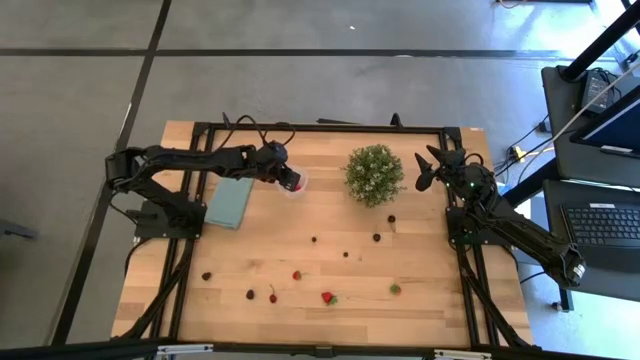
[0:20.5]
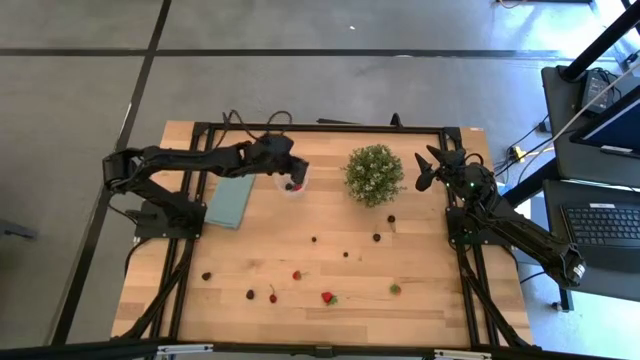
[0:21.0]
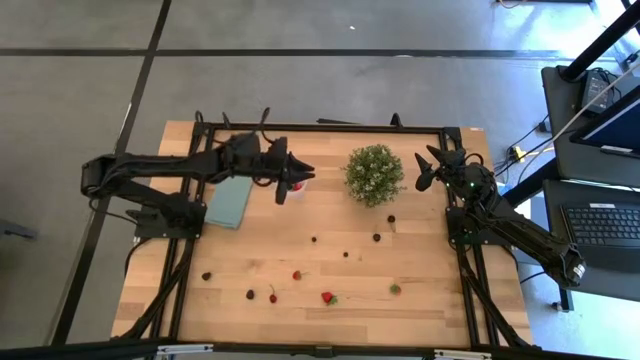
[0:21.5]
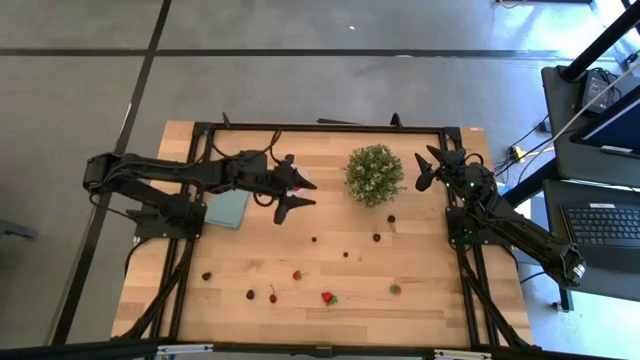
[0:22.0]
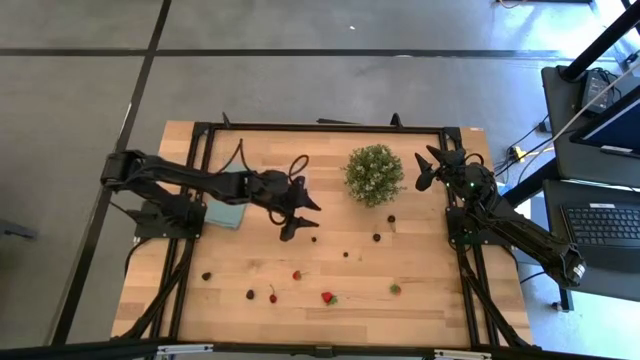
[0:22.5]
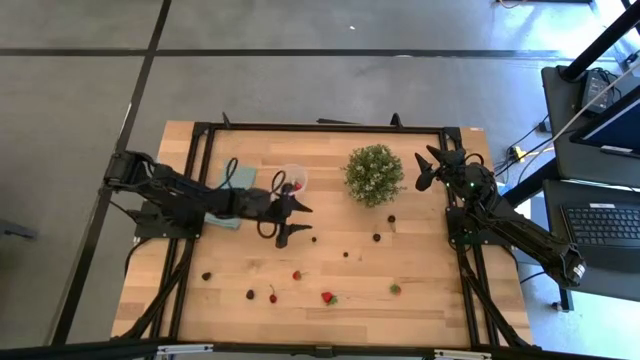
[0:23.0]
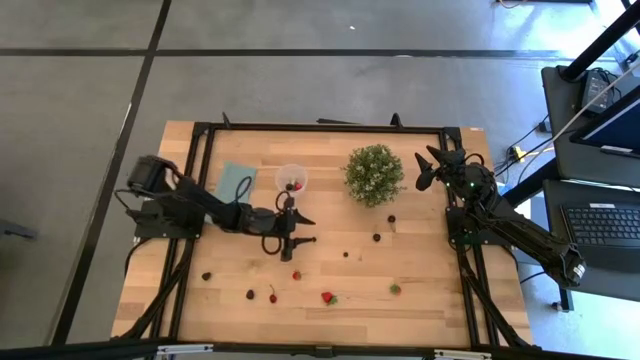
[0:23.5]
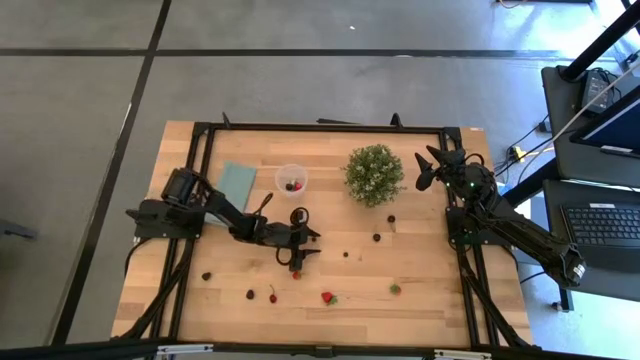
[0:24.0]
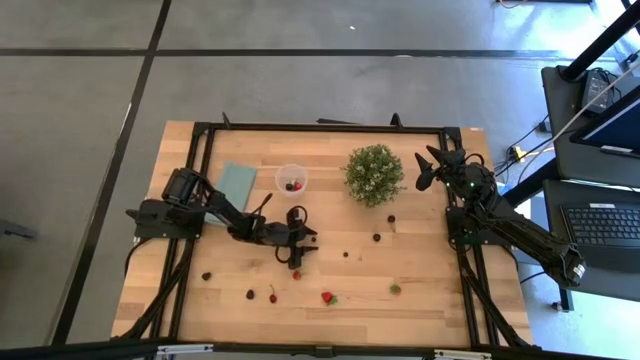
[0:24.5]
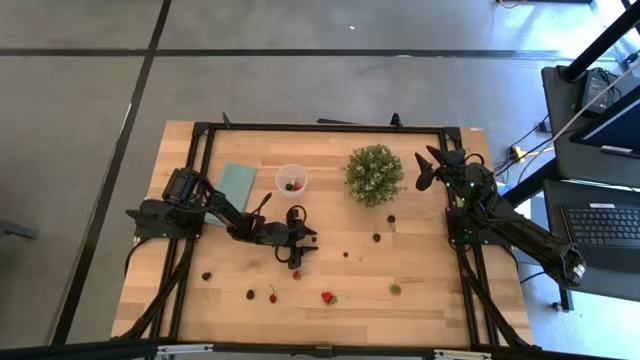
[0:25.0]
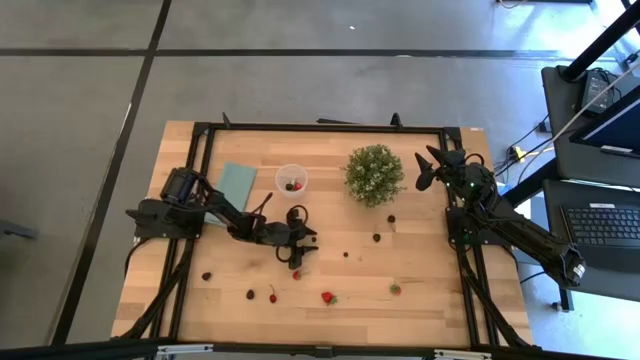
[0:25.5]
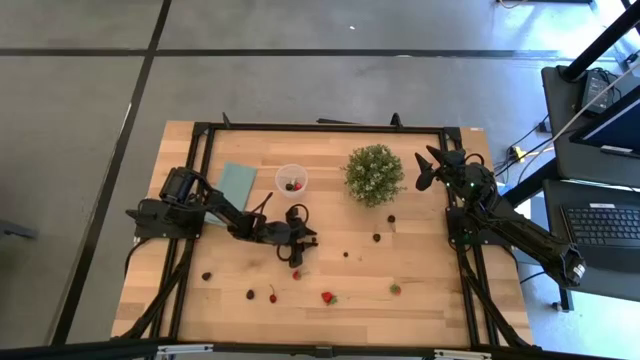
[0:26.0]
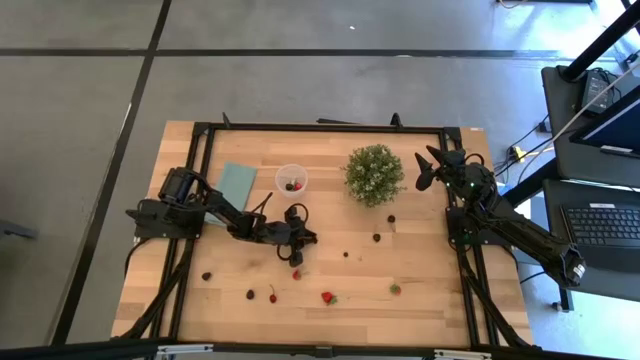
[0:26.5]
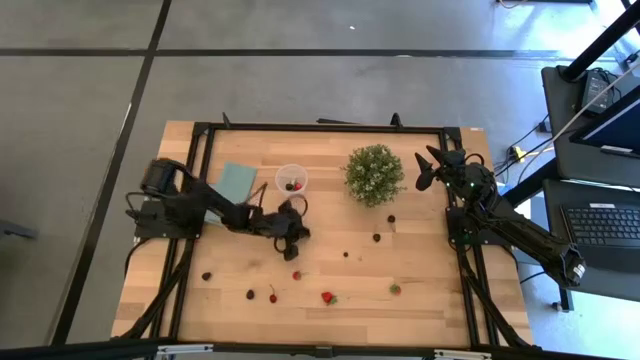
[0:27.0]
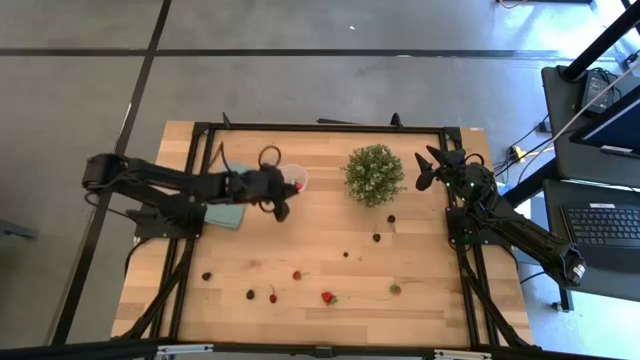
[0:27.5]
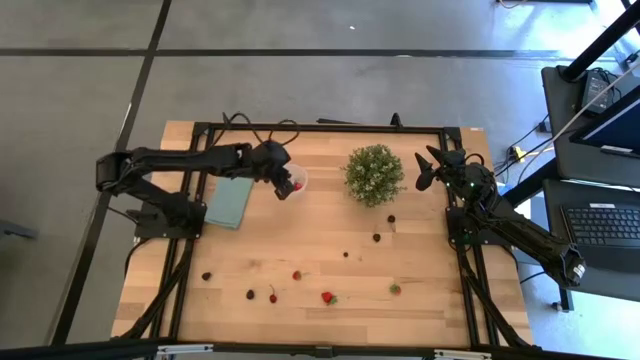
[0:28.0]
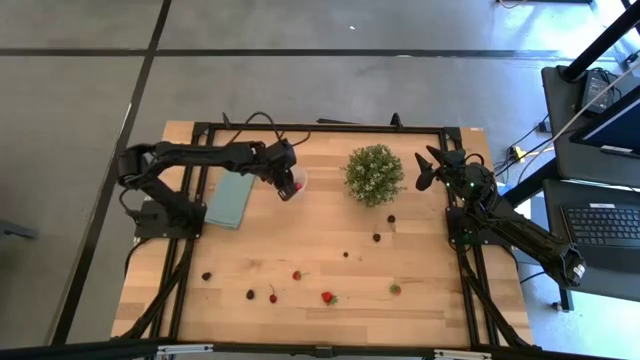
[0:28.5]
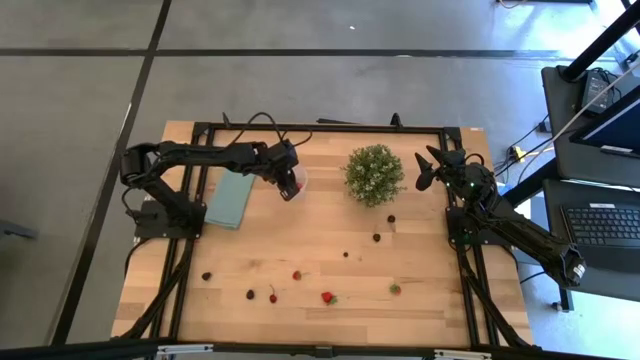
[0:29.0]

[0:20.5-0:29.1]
Task: Pick and placing Produce into tupperware
Put the blue berry into the transparent container

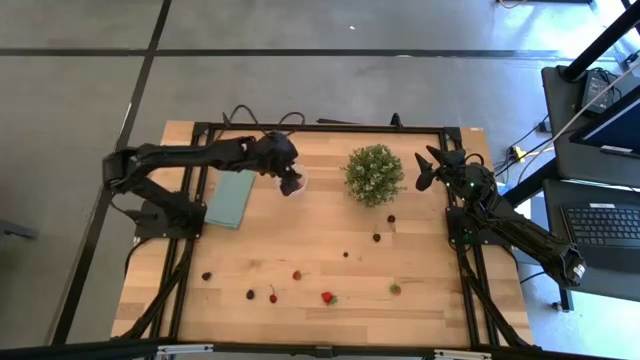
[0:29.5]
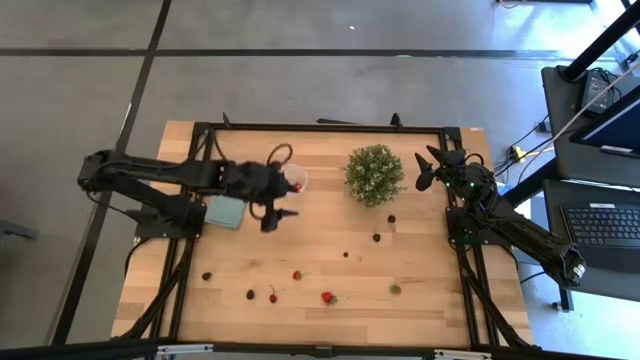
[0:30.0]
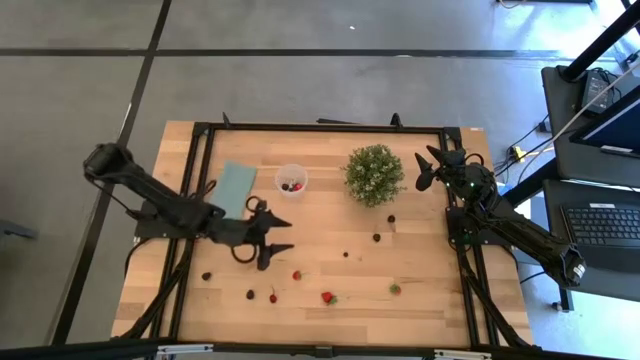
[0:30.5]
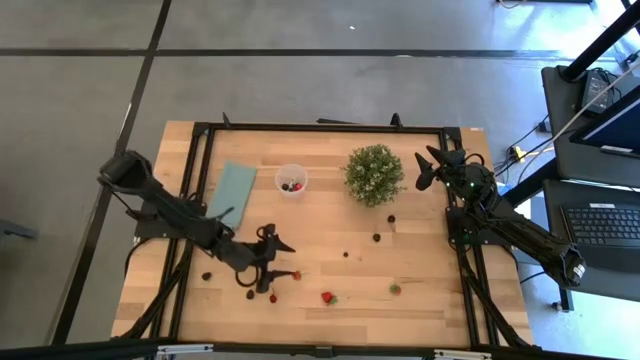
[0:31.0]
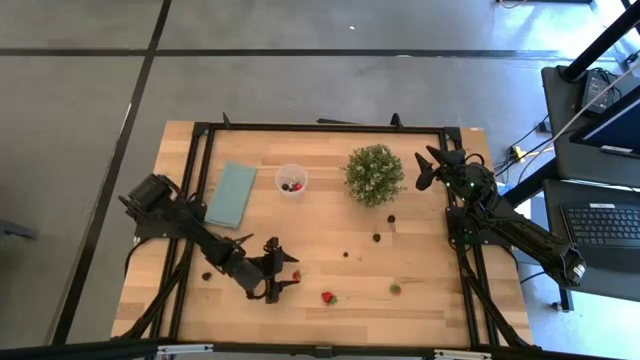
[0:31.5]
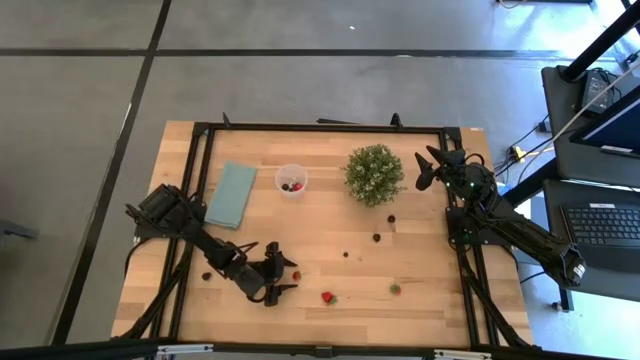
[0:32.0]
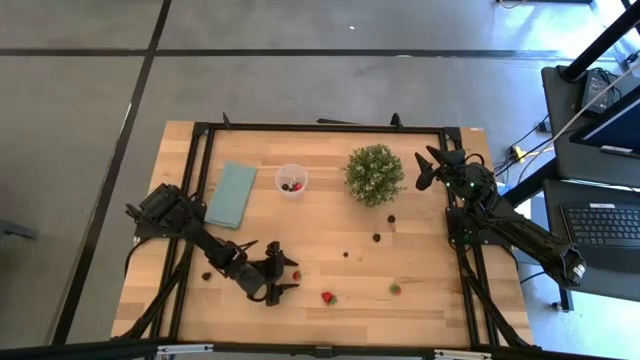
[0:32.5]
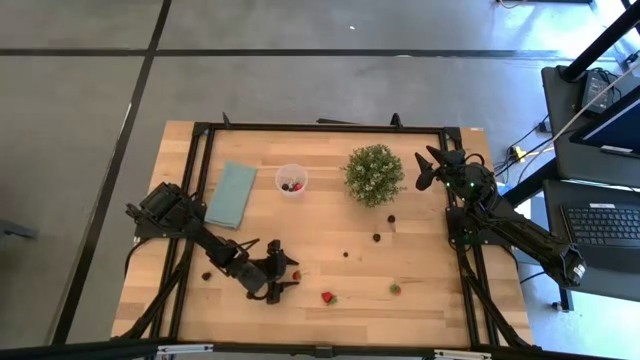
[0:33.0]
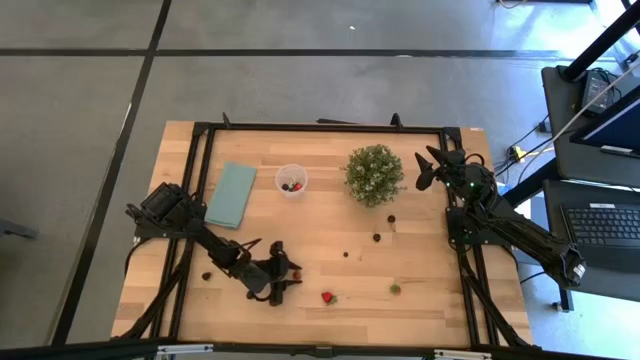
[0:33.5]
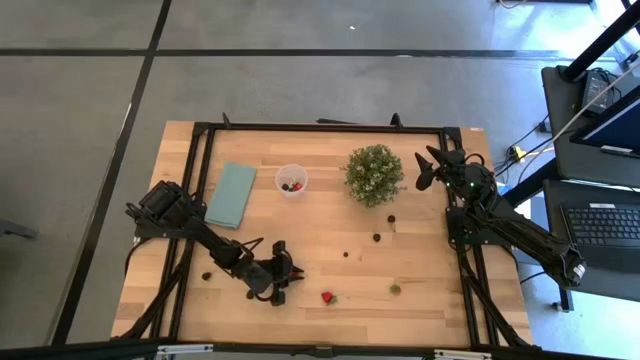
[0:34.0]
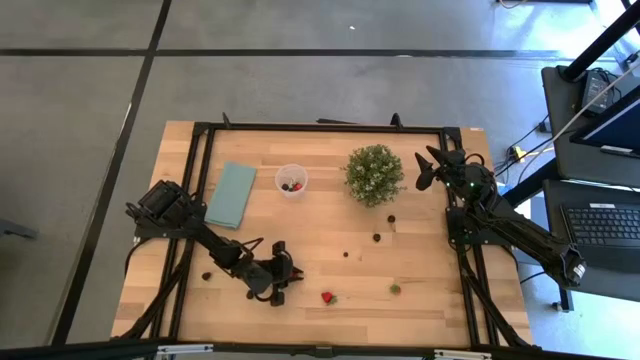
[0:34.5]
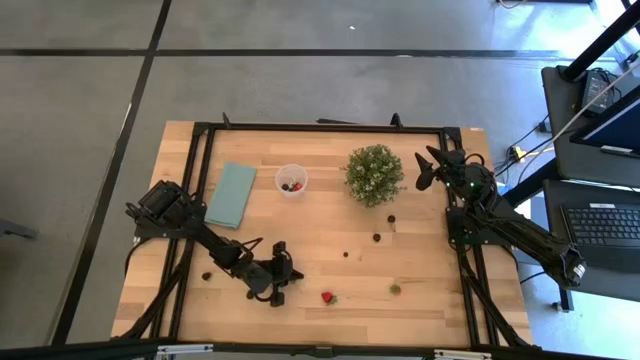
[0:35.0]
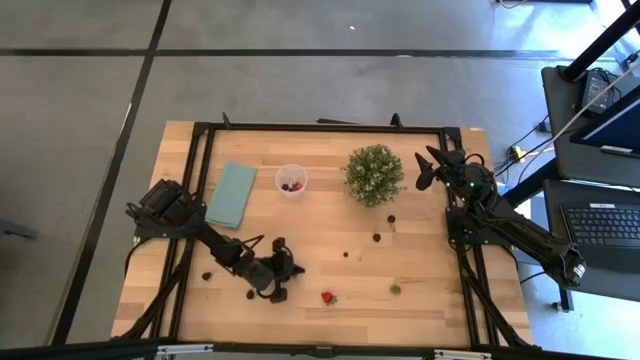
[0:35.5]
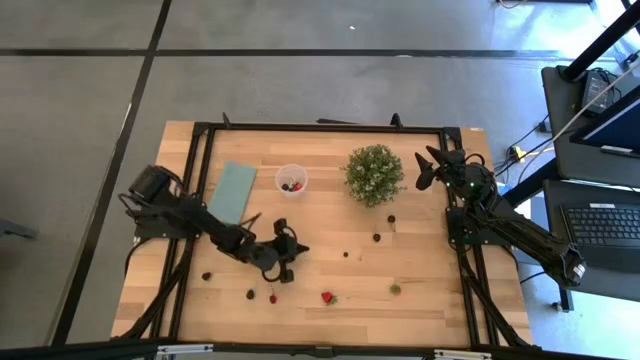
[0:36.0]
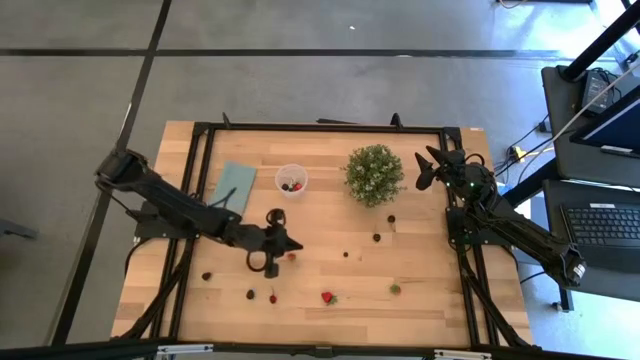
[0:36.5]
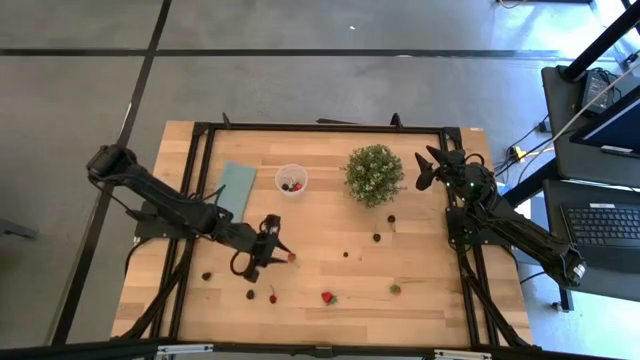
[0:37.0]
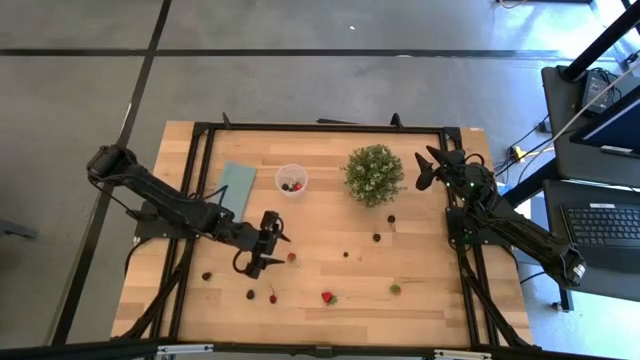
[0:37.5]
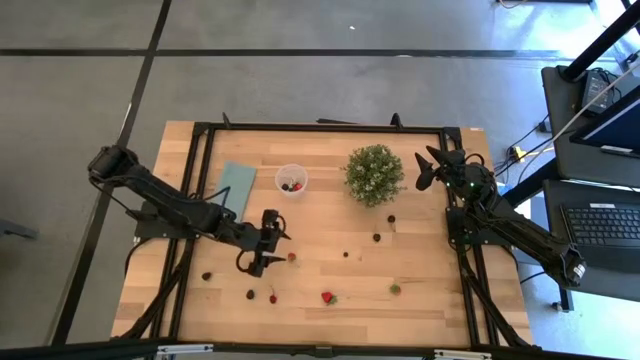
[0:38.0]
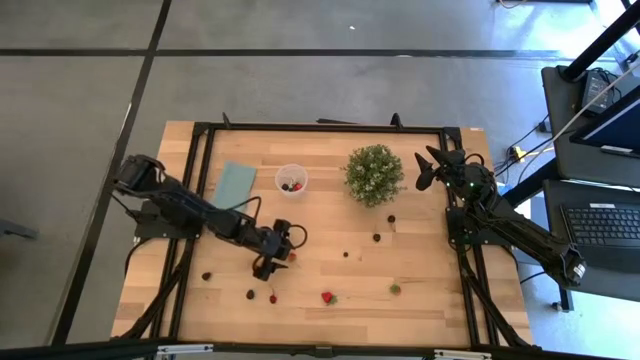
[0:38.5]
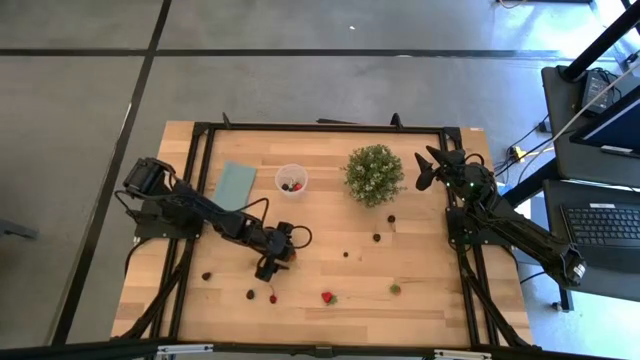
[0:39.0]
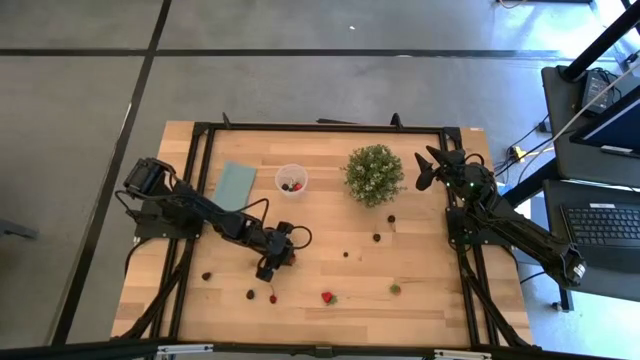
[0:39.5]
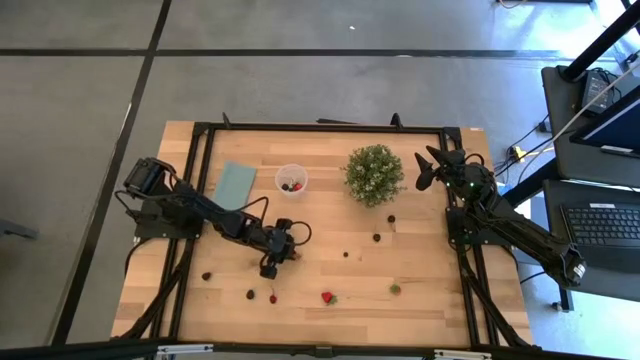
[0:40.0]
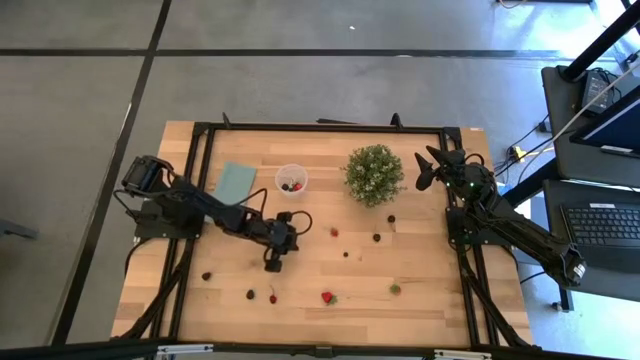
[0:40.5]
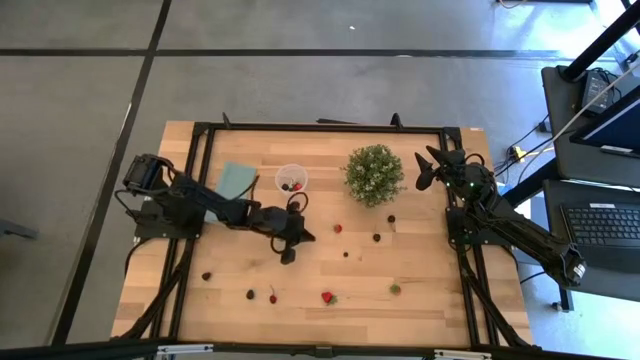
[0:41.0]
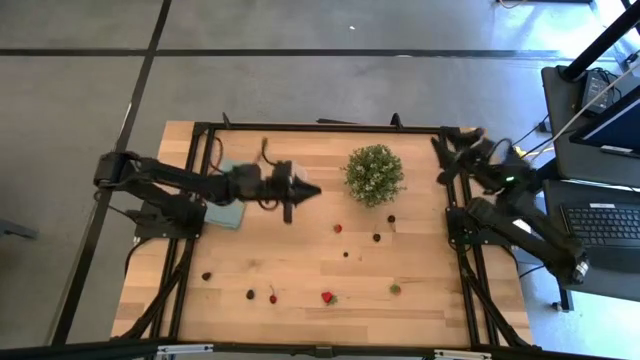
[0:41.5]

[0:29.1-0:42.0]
Put the red strawberry into the transparent container
